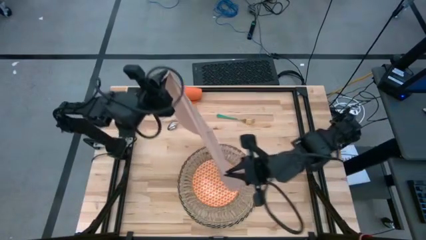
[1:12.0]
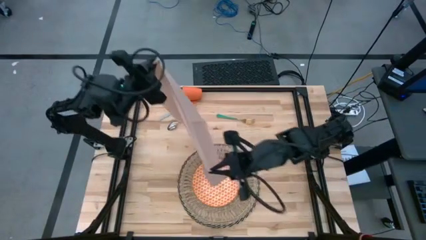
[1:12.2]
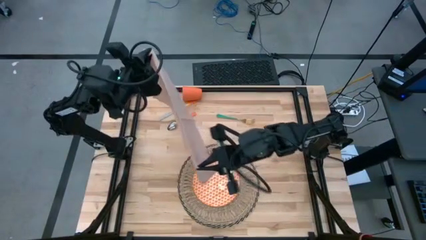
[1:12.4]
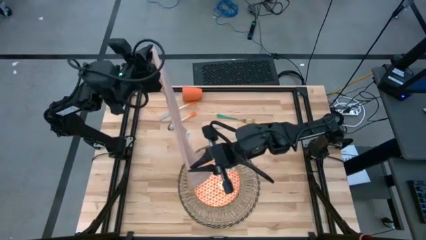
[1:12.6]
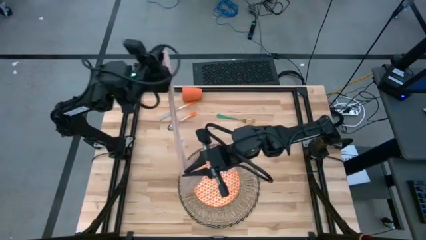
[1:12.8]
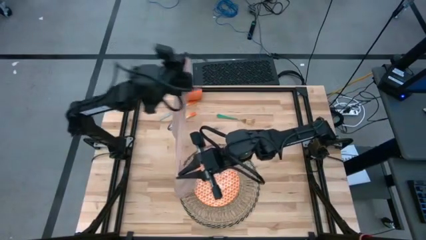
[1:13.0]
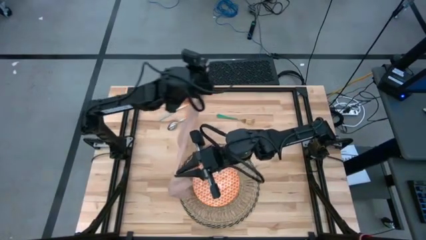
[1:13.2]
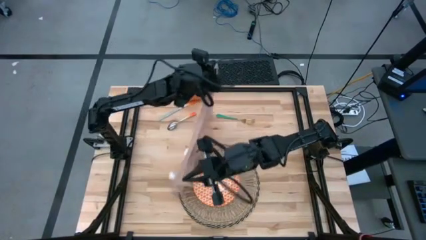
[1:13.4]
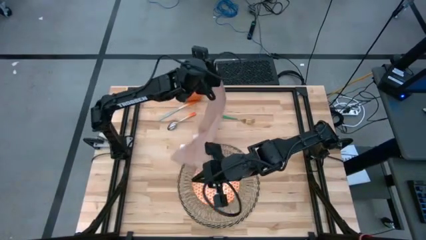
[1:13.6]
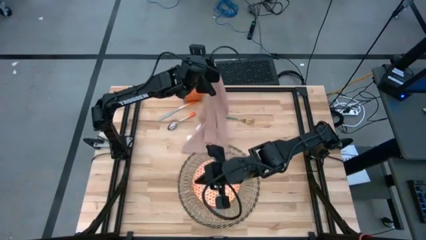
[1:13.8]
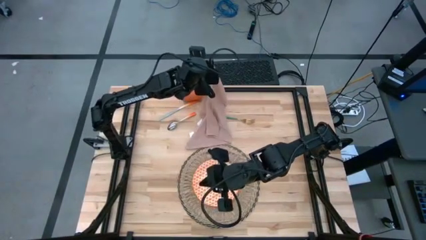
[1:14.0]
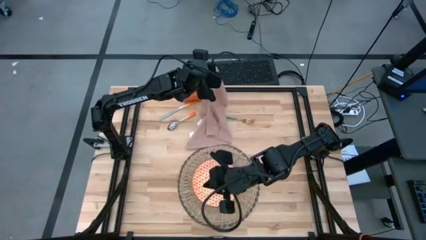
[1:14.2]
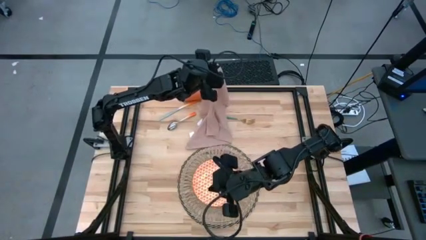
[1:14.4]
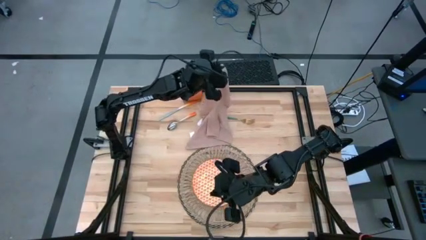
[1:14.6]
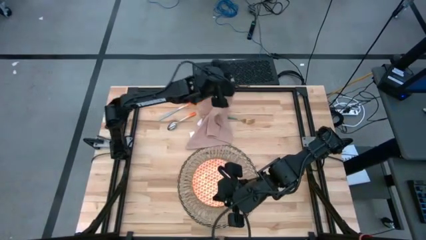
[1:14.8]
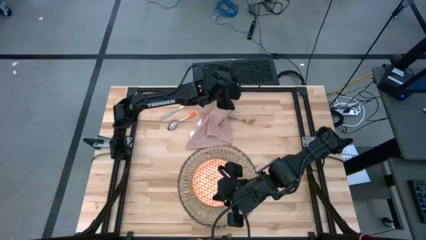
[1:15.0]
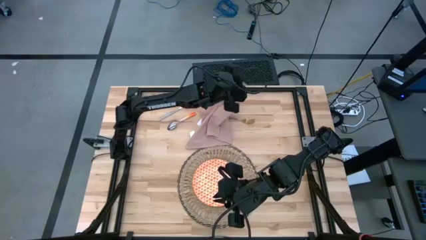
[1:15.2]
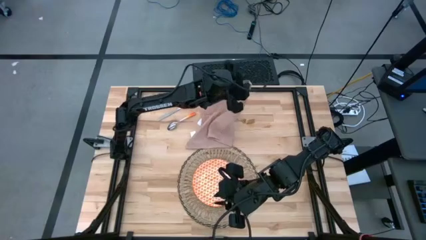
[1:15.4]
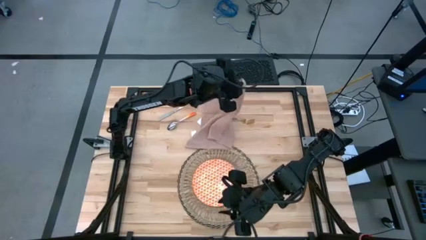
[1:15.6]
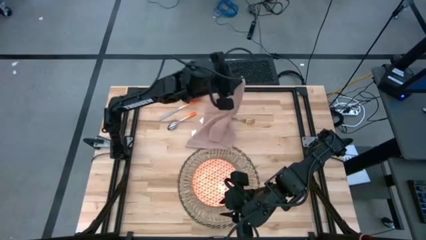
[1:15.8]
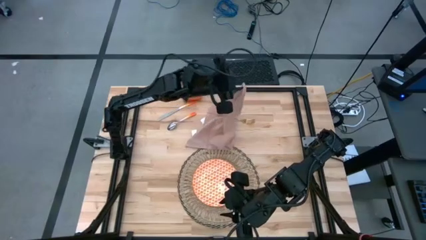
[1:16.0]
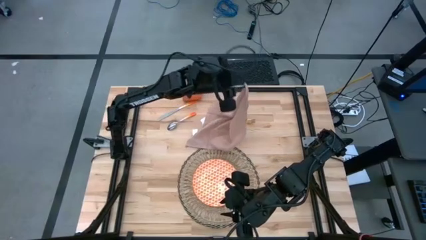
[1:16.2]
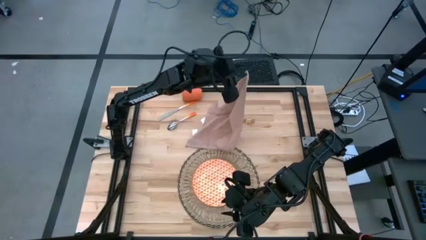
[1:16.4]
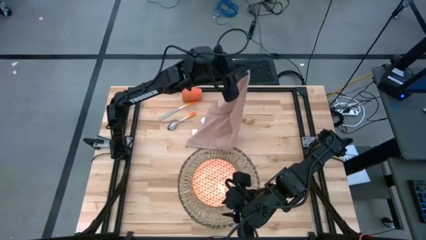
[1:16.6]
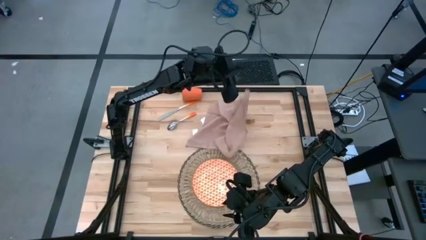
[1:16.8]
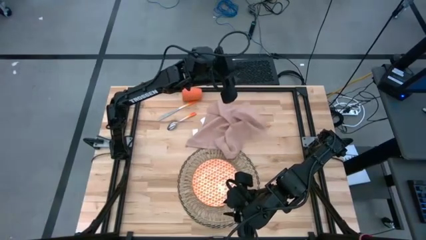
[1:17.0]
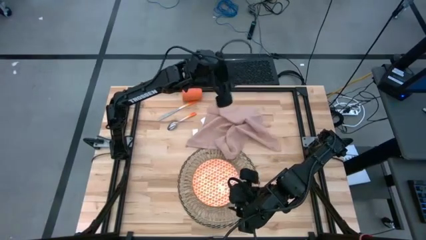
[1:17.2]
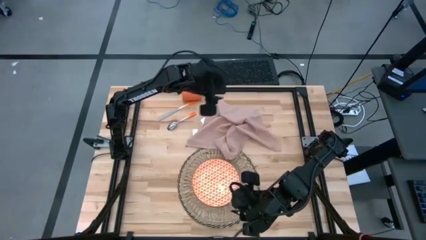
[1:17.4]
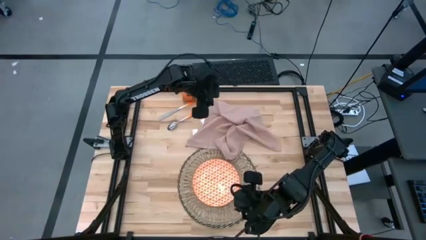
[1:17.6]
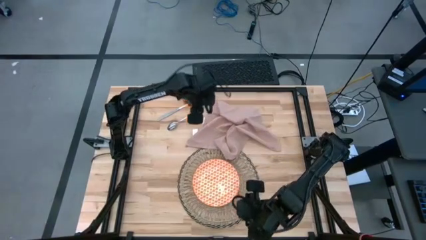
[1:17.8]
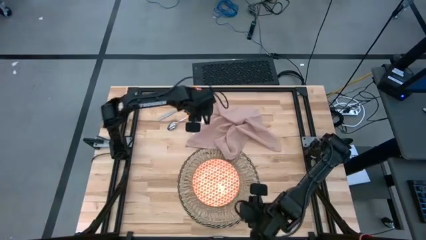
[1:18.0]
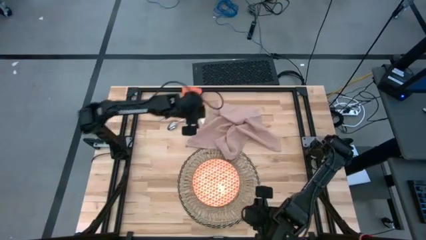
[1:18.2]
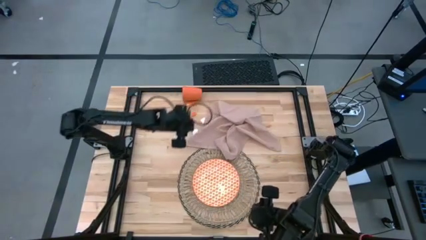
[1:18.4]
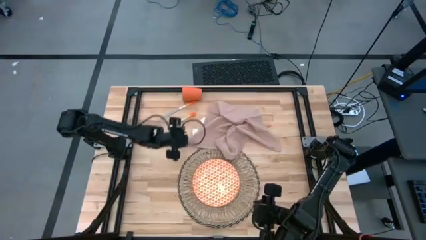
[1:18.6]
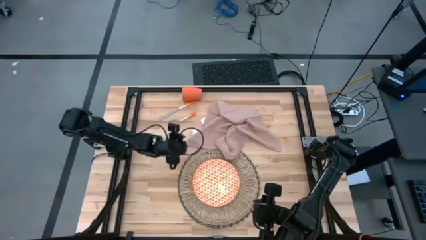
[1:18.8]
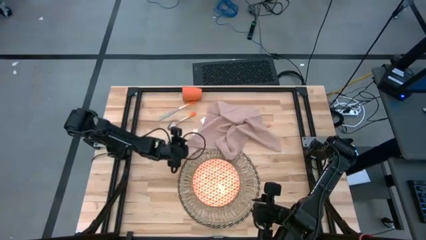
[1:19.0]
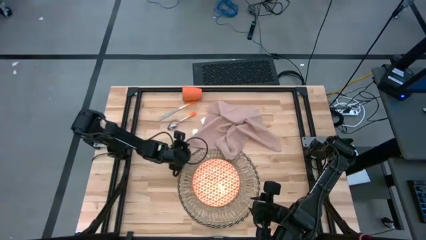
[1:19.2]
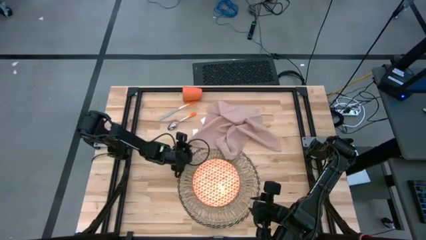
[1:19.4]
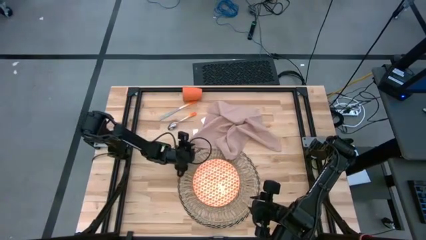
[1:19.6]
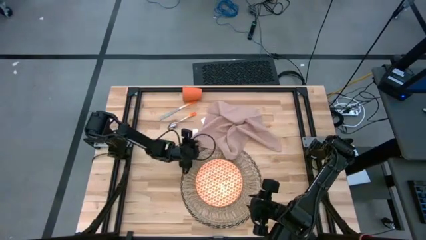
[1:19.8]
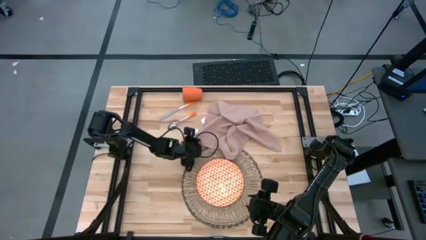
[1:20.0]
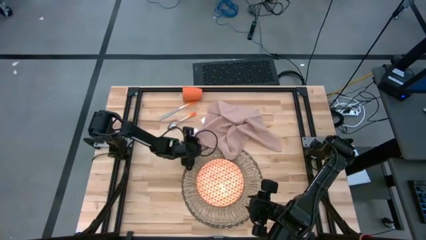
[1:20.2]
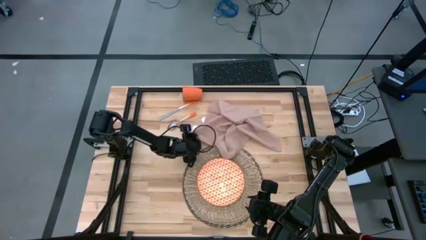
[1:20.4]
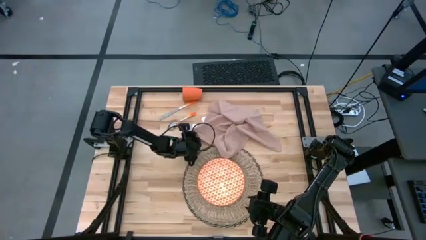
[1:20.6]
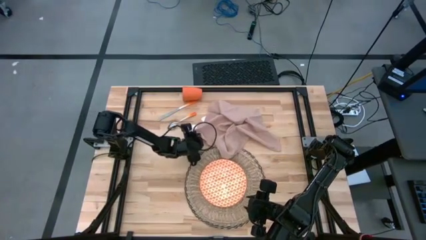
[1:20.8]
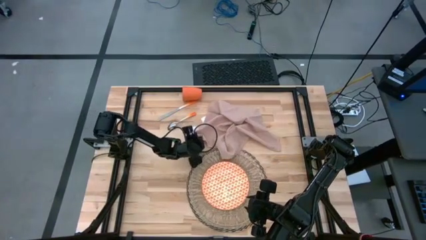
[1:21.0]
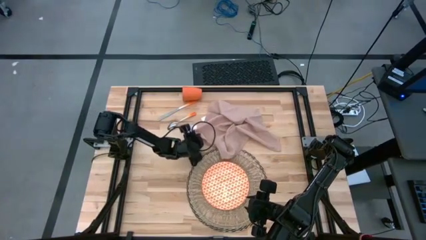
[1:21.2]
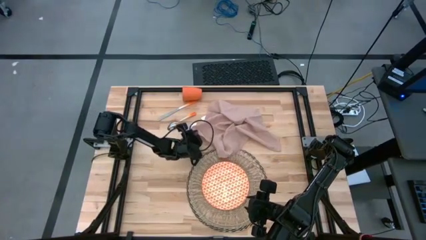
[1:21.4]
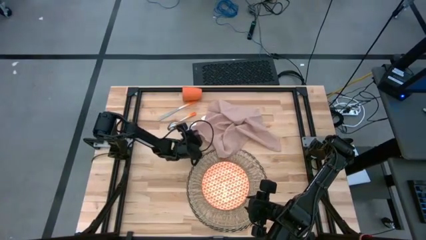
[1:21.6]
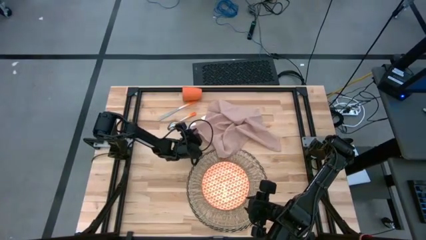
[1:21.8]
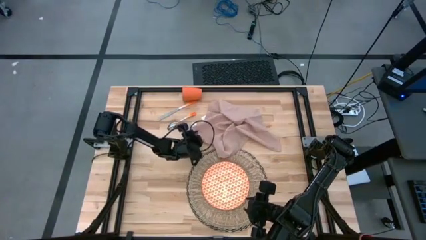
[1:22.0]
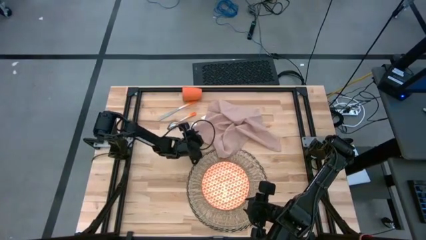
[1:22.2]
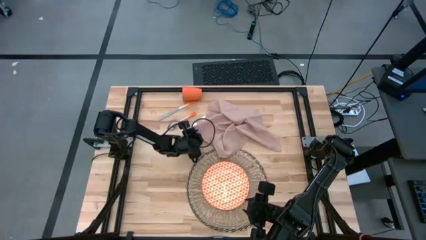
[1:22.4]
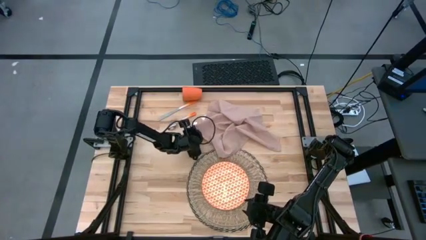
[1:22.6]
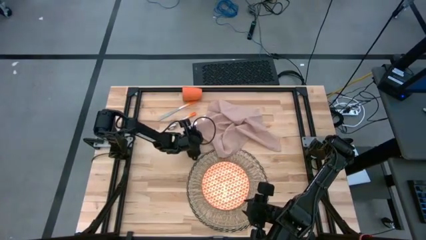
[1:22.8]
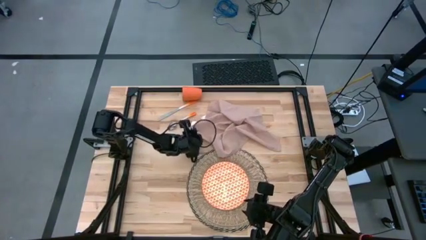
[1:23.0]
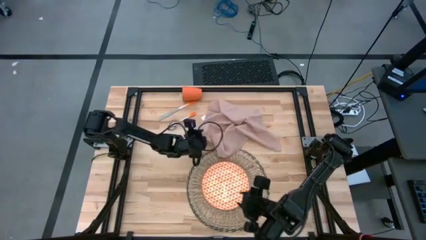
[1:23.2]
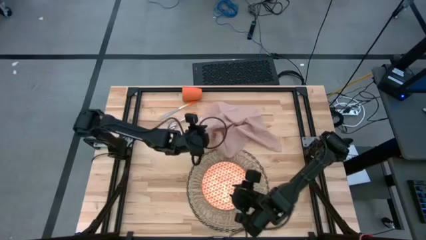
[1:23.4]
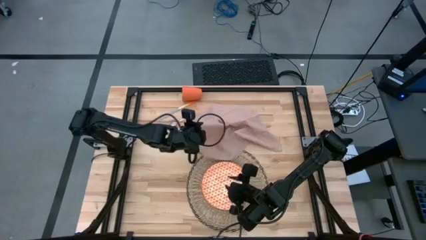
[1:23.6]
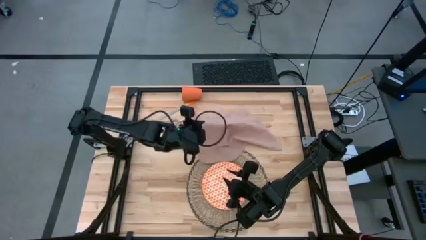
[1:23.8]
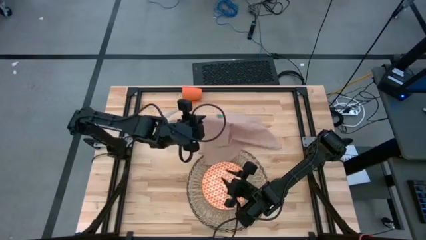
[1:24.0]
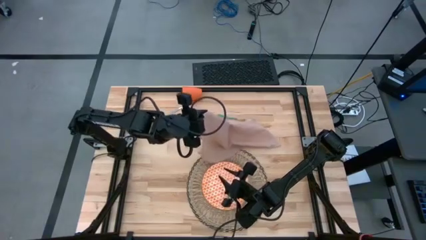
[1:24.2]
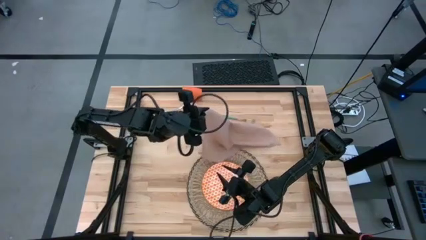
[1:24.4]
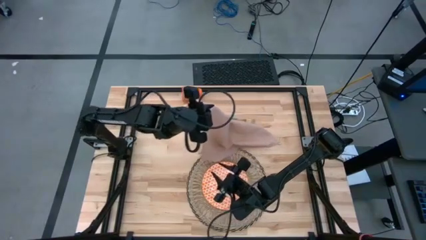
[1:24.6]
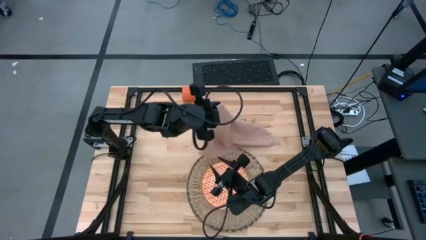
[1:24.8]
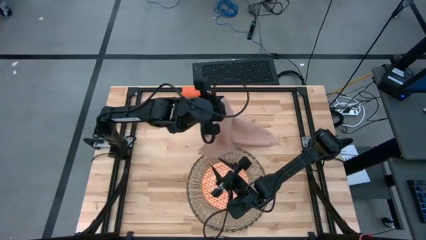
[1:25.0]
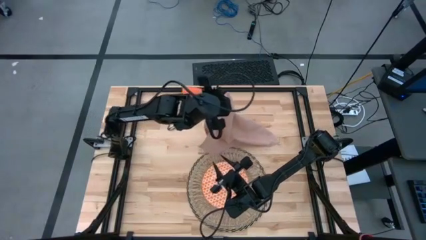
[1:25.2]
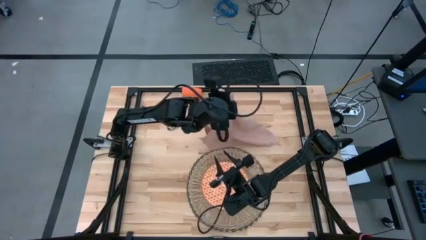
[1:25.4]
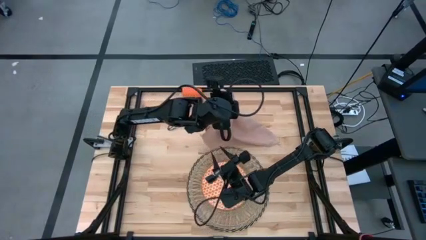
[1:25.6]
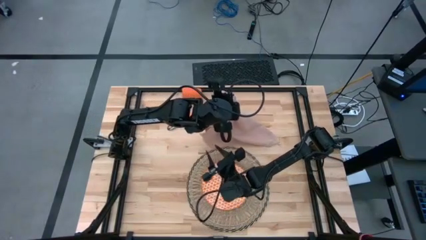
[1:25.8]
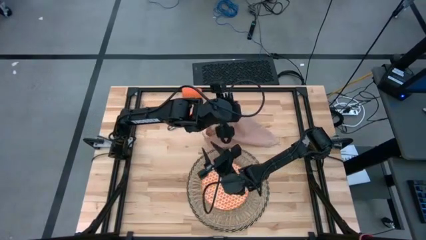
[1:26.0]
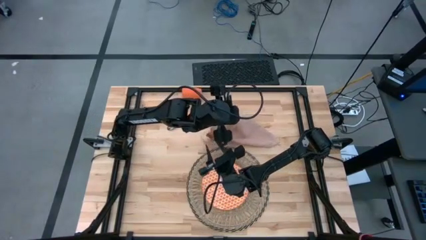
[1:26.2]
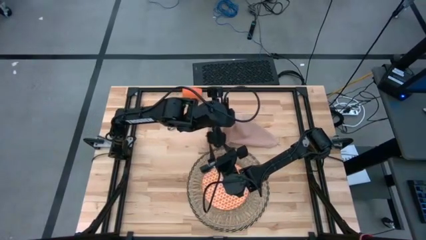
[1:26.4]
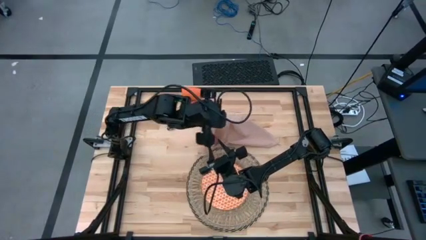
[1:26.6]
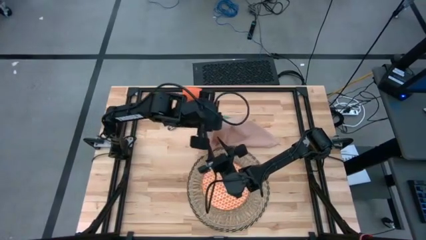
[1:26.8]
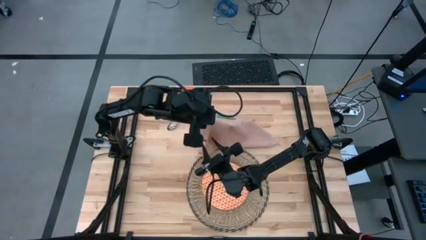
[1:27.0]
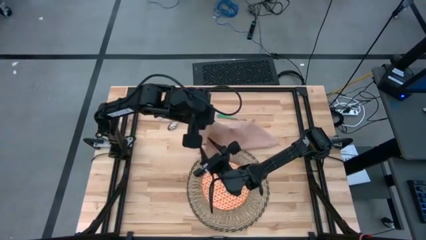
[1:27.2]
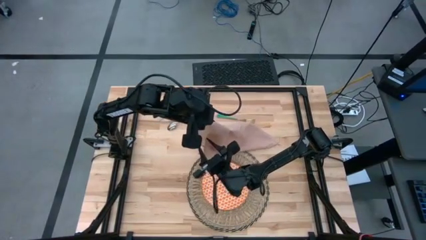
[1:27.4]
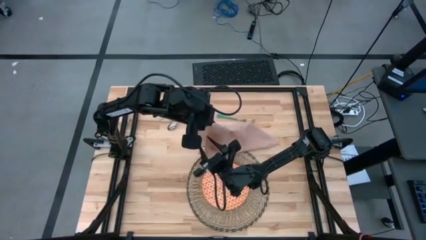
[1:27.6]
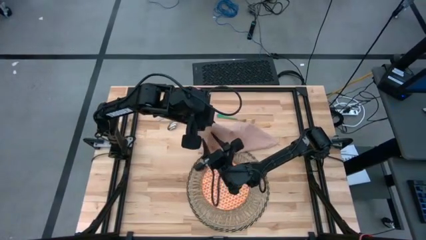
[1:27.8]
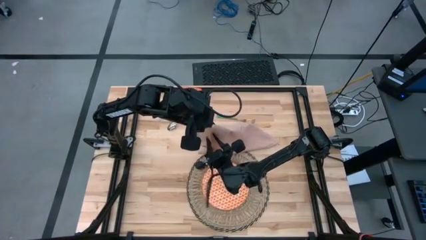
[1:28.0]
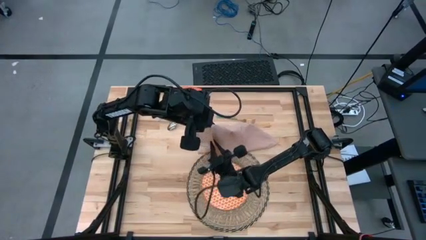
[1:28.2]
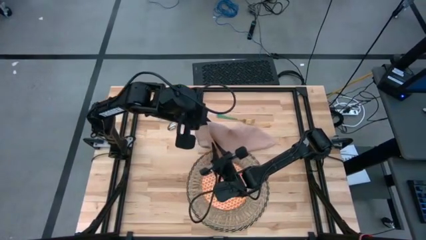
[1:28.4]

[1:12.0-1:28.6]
Task: Set table place
Fold the napkin

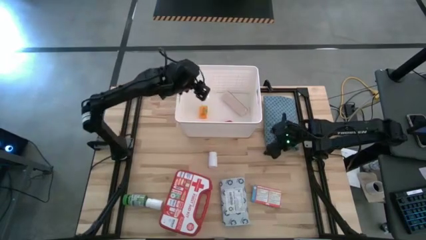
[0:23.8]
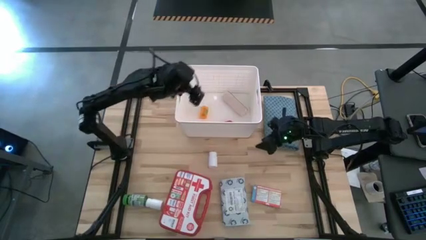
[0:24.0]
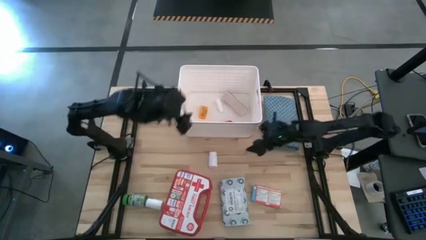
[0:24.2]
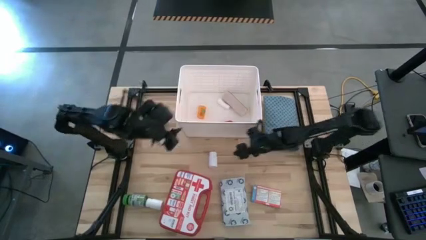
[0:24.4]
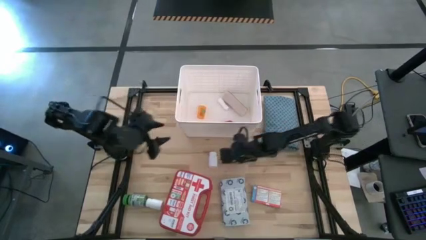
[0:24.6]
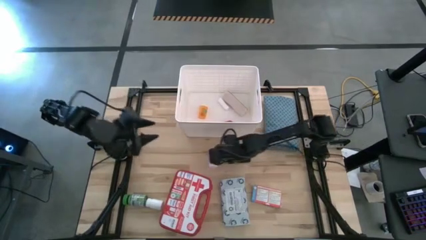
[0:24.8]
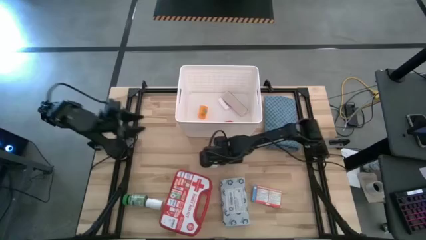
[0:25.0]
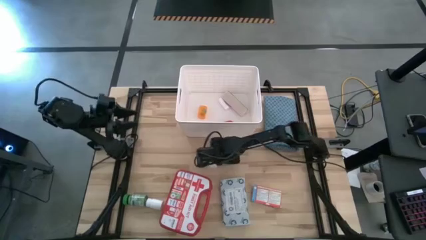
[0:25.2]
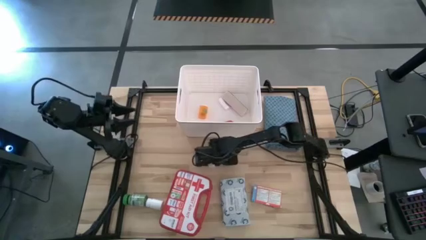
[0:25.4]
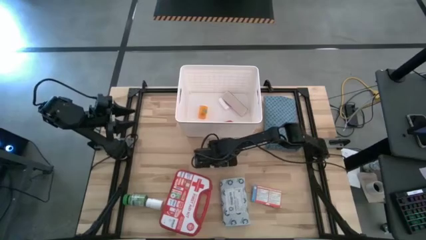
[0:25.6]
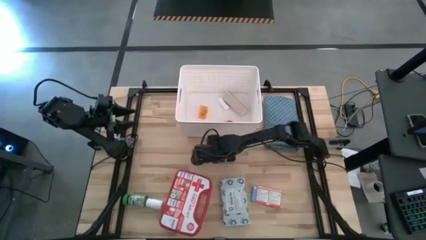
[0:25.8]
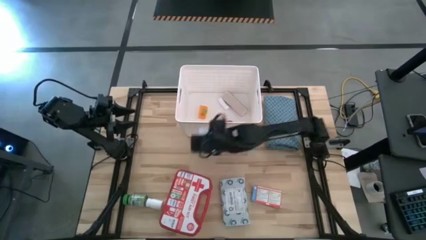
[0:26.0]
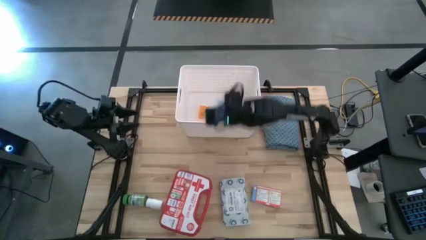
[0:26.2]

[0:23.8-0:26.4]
Task: Pick & place medical supplies in basket/bin
Put the top white pill bottle into the white bin
